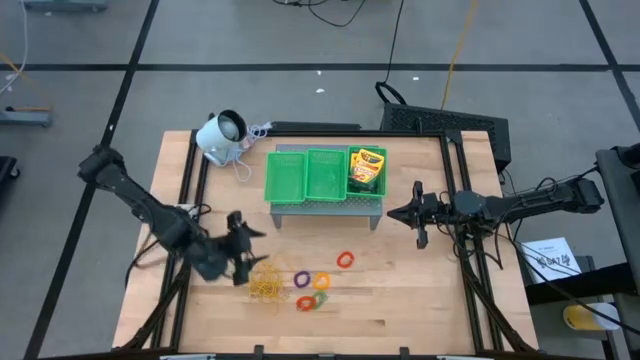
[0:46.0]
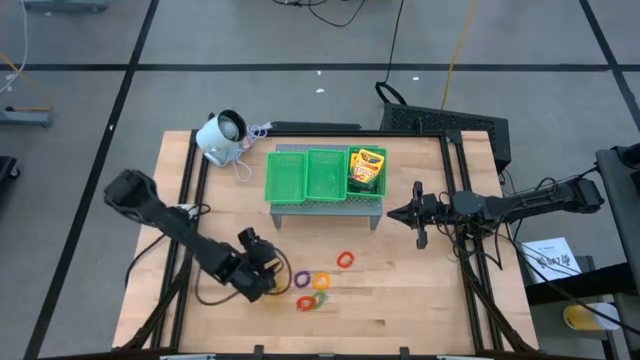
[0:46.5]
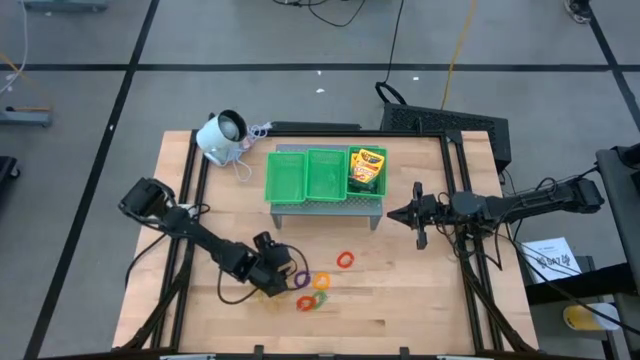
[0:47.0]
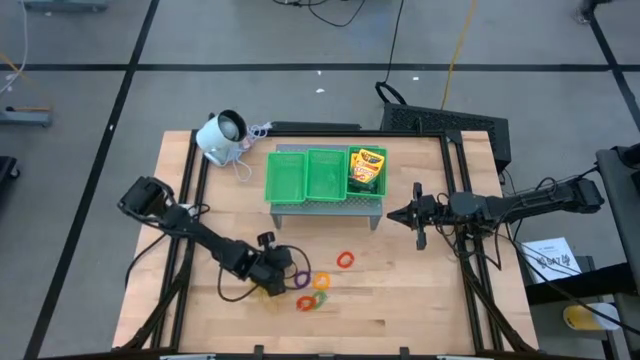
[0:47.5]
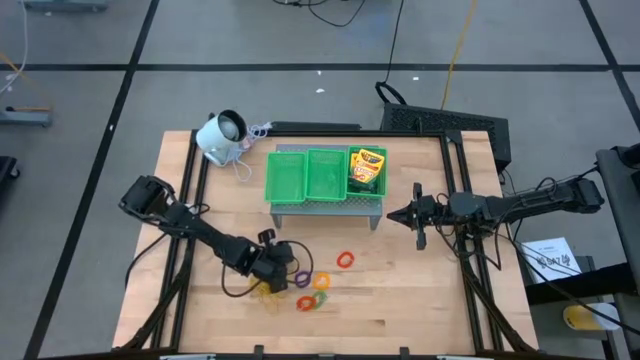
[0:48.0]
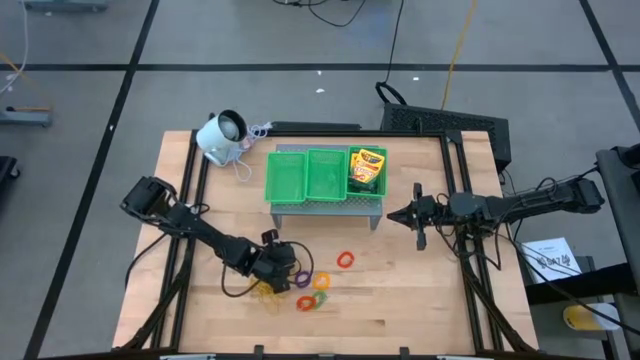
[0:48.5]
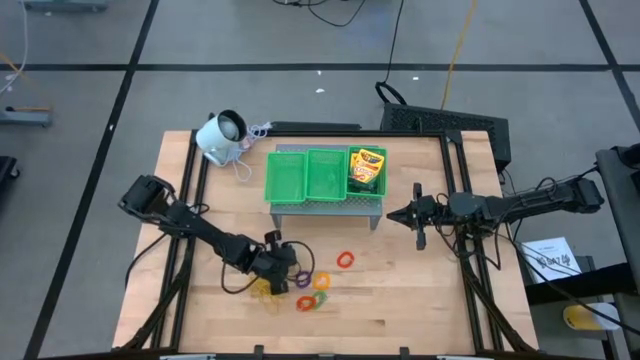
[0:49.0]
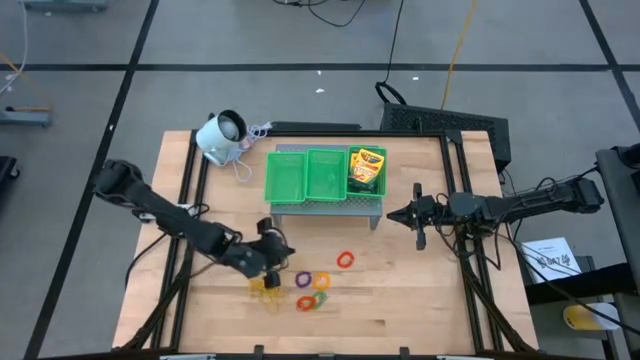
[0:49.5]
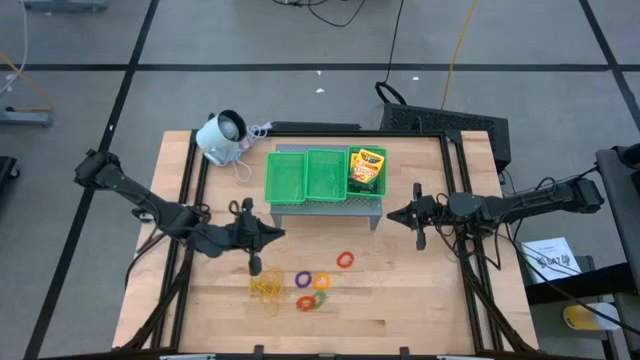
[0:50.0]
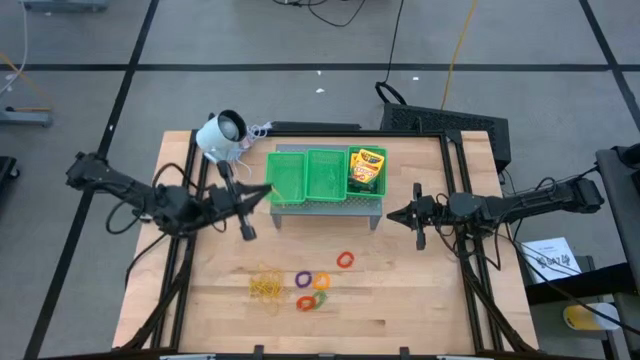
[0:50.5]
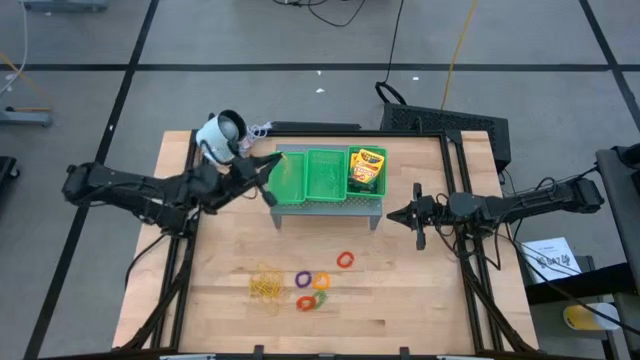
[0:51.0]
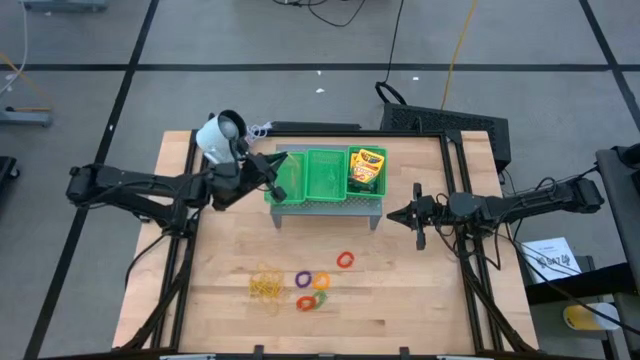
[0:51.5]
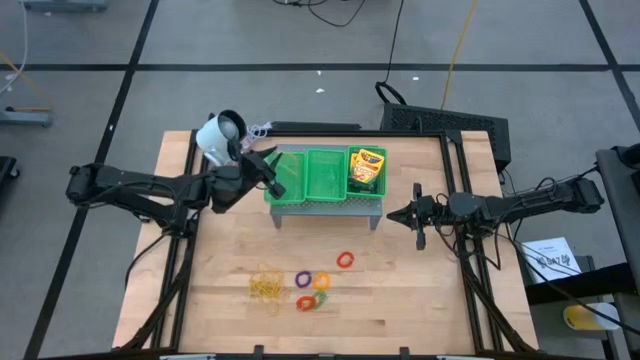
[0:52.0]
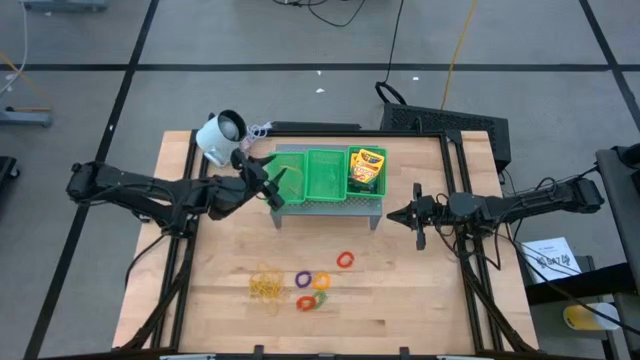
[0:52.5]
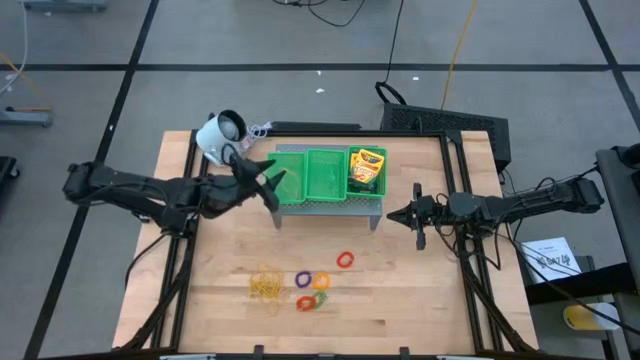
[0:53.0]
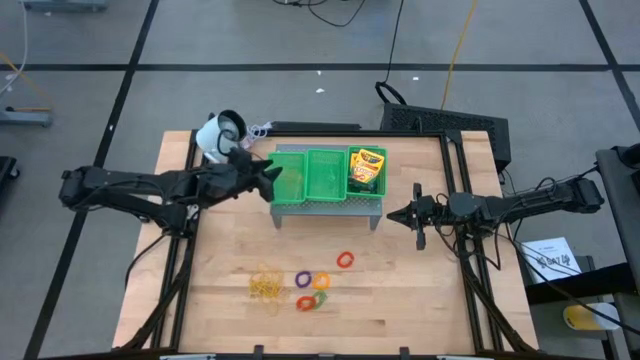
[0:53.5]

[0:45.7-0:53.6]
Task: Pick & Place Office Desk Supplies
Put the yellow rubber band into the left green basket

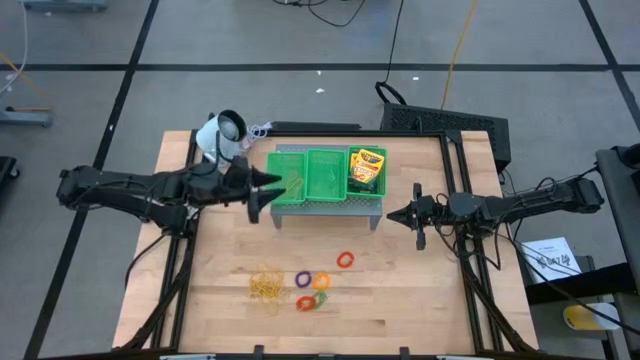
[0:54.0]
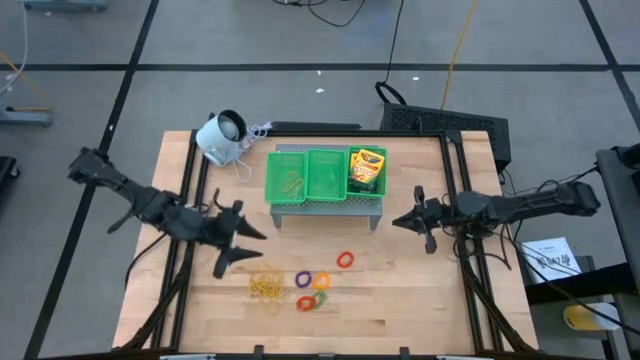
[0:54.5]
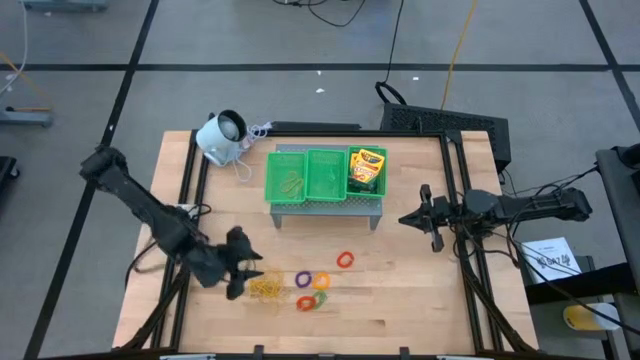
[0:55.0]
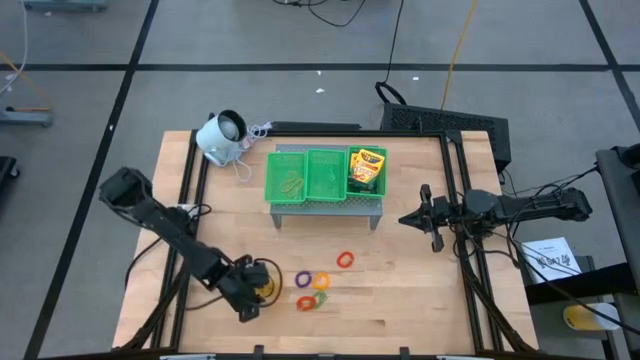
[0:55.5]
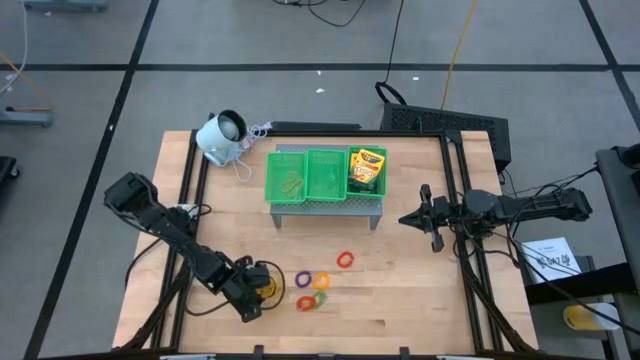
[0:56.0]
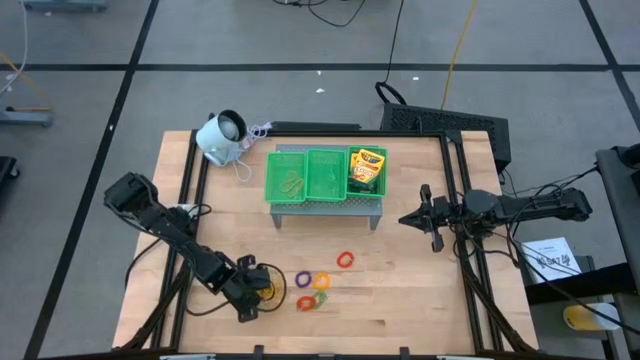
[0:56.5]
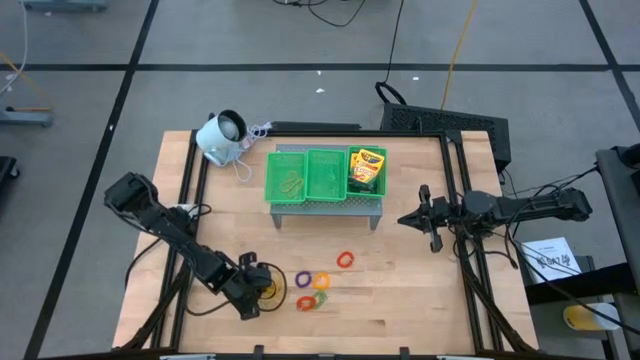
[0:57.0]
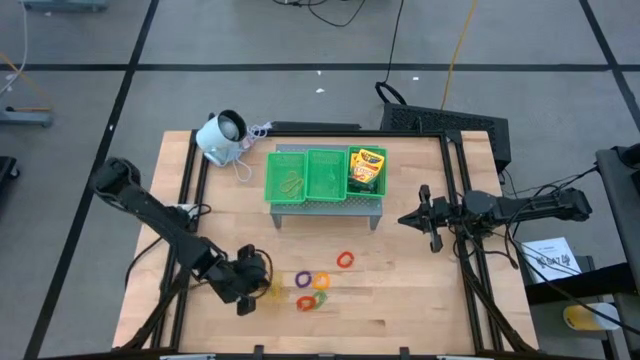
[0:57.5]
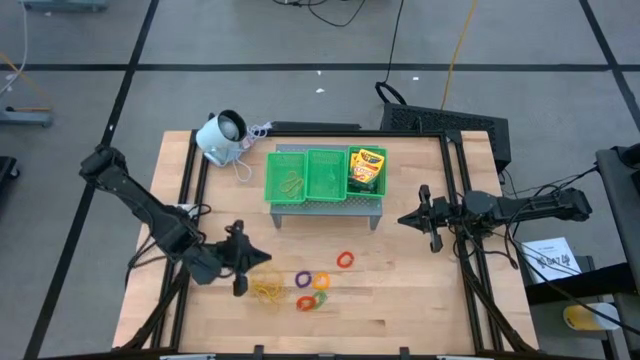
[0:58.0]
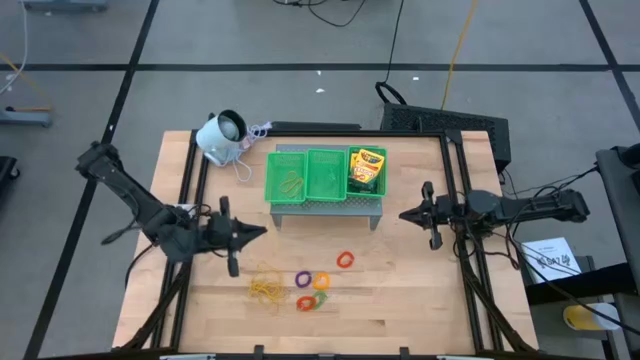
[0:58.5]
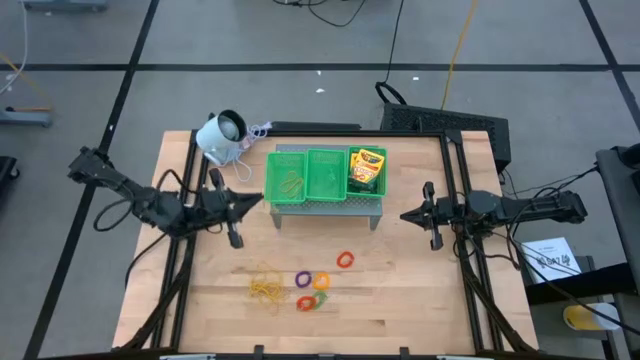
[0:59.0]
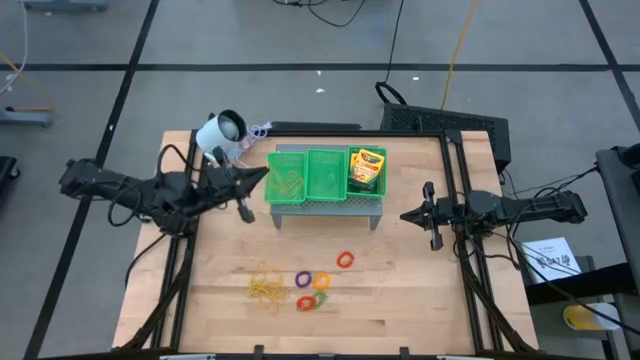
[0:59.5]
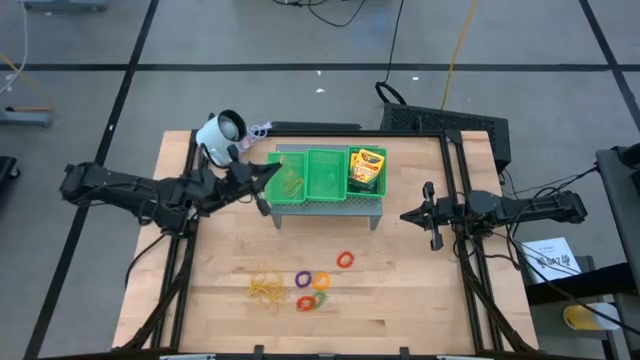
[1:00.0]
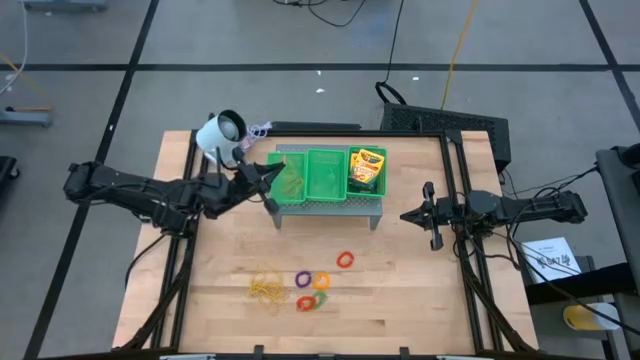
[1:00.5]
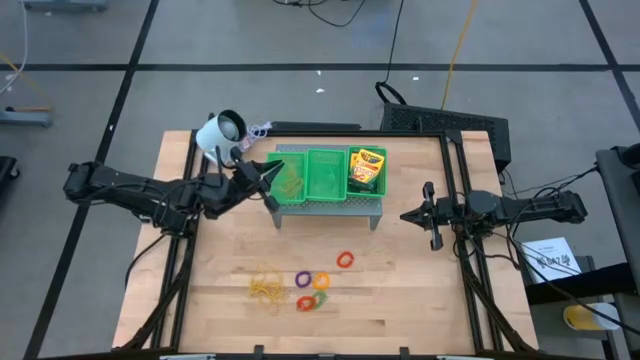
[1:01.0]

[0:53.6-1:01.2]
Put the yellow rubber band into the left green basket

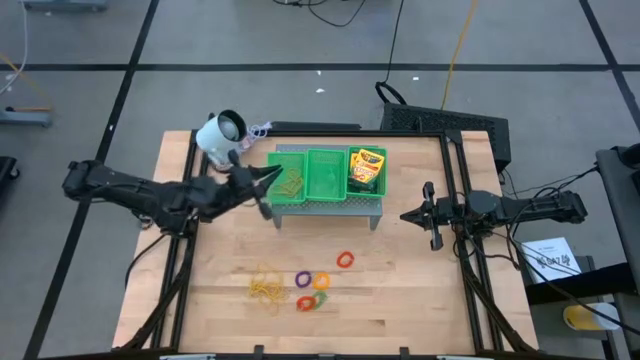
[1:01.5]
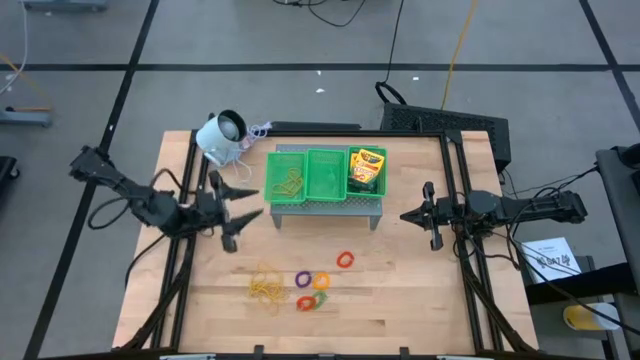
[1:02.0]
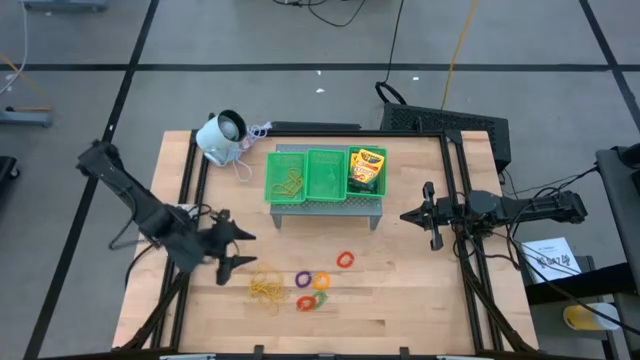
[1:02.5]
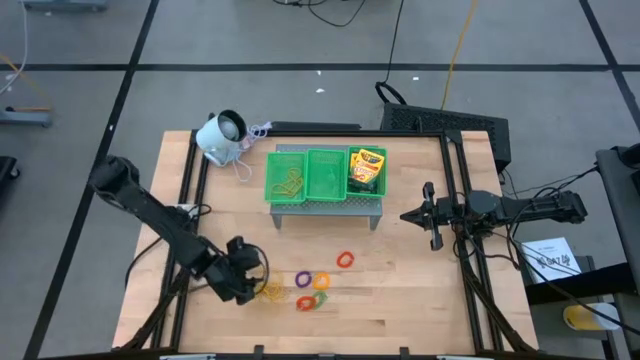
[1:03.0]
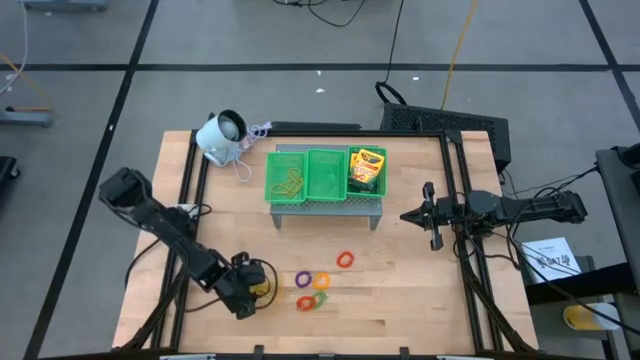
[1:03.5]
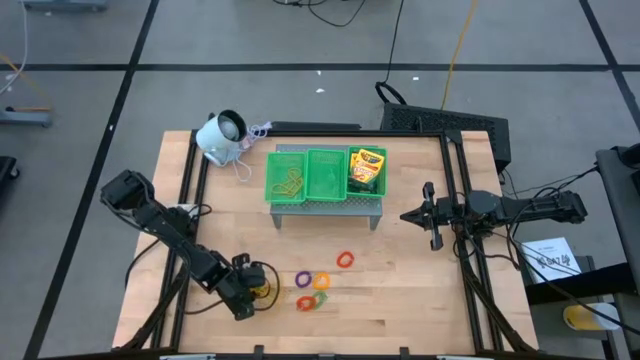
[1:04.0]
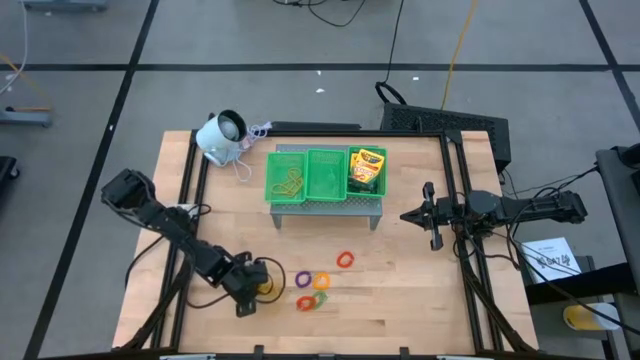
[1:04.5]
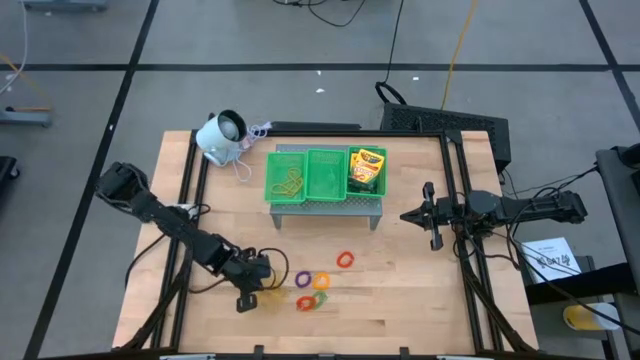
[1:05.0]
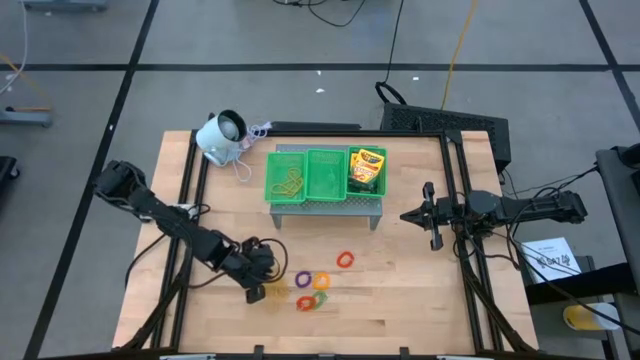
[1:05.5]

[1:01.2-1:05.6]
Put the yellow rubber band into the left green basket

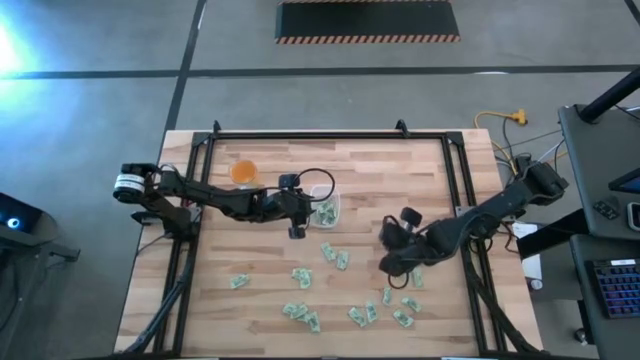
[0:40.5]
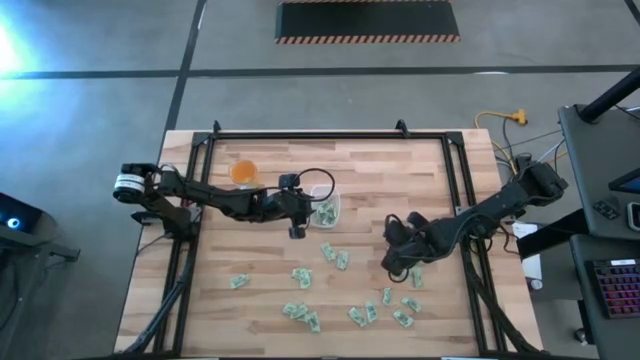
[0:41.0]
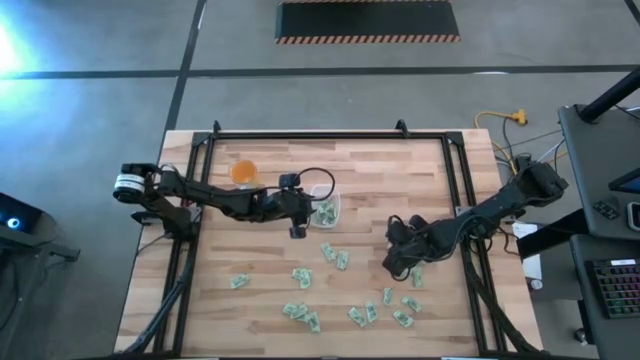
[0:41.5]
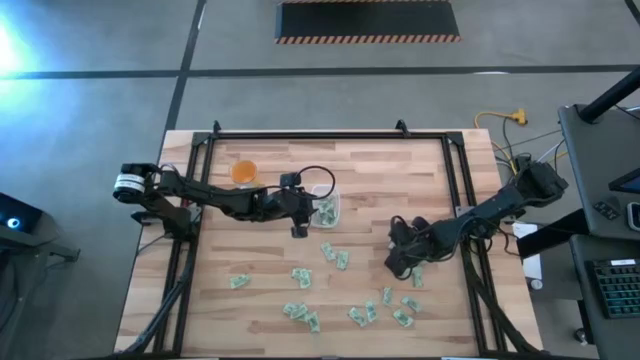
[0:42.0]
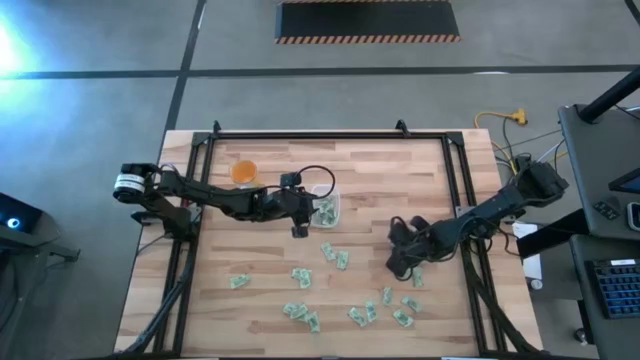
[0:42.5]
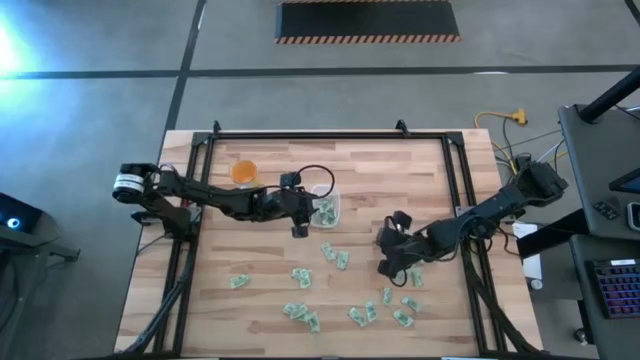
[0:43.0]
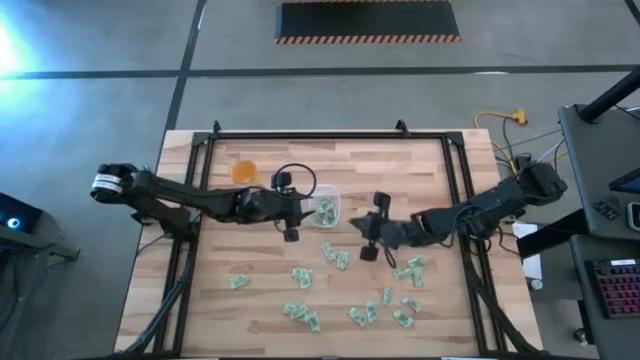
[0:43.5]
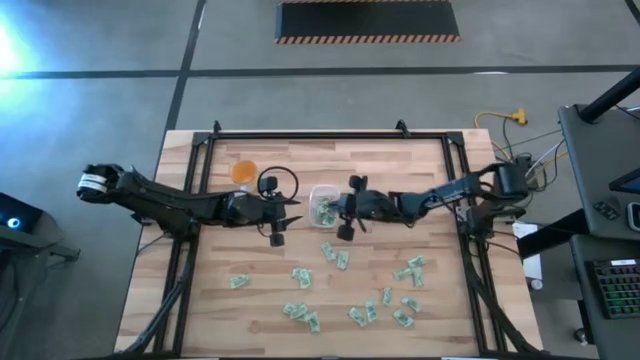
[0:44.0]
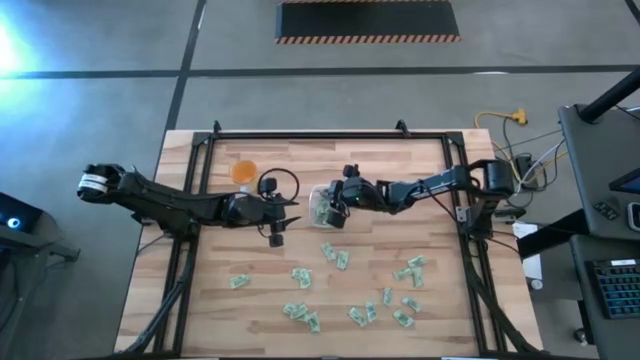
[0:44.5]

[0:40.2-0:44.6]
Task: Pick and place Stevia / Truvia into bins
Put the stevia packet into the bin
